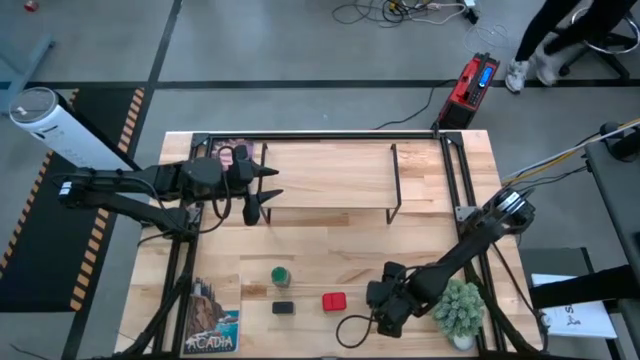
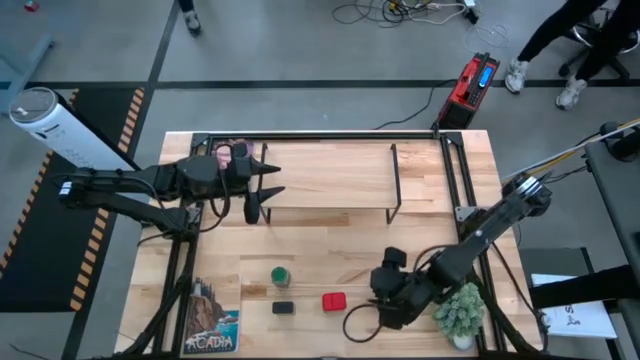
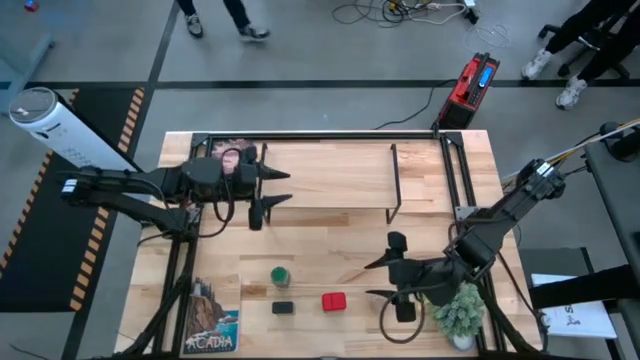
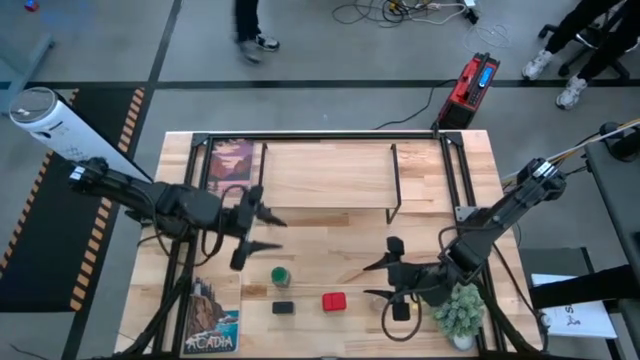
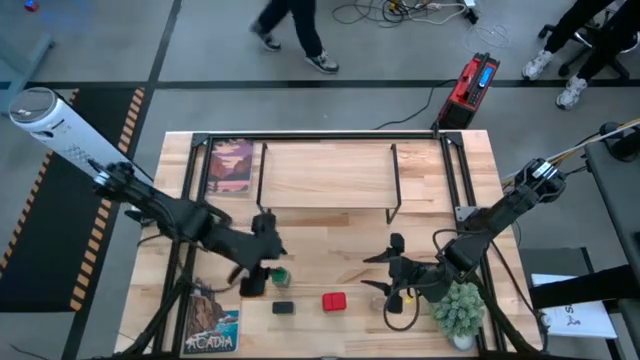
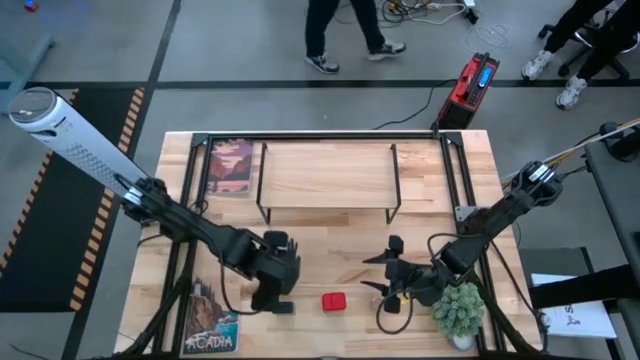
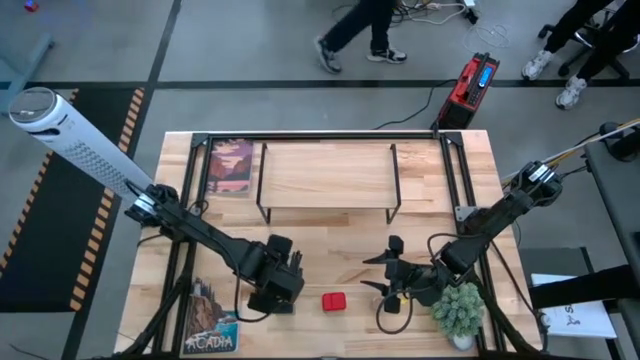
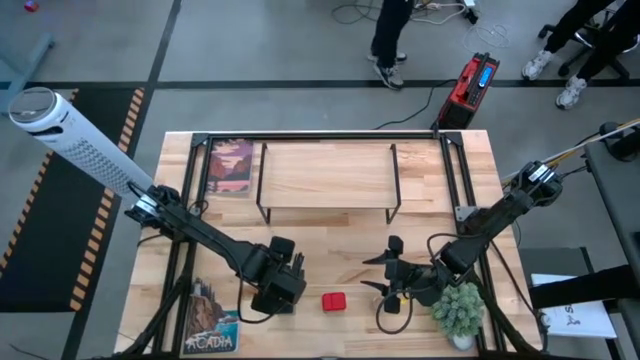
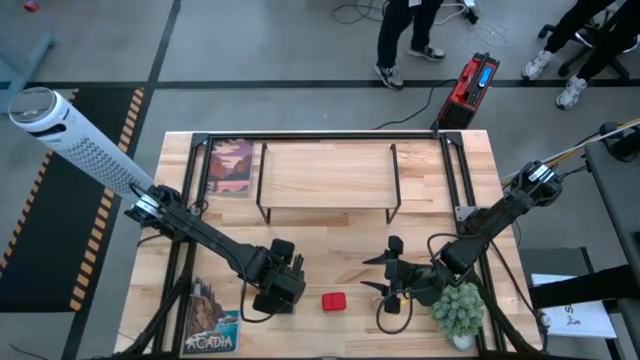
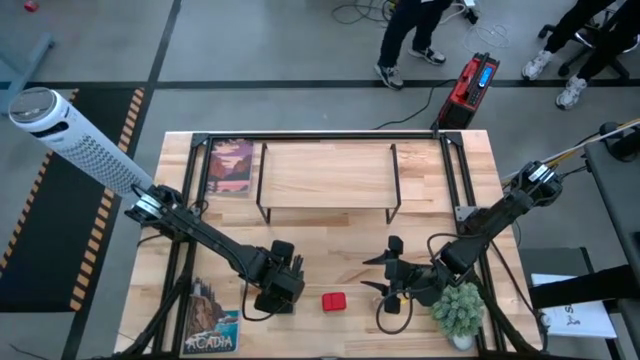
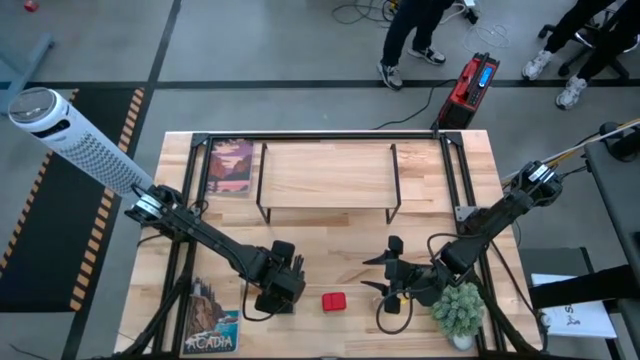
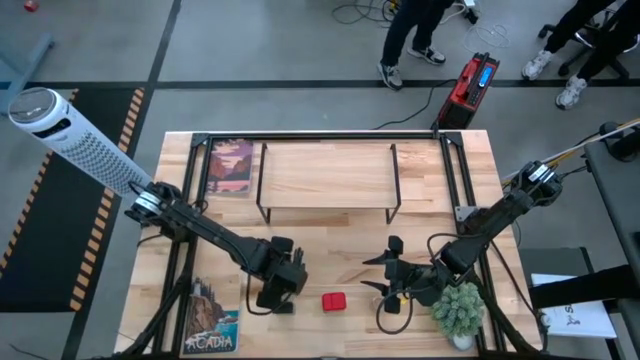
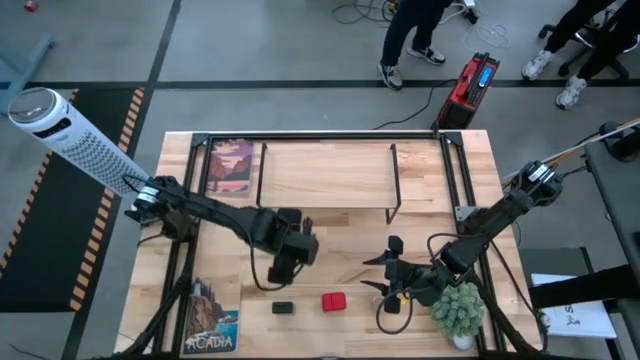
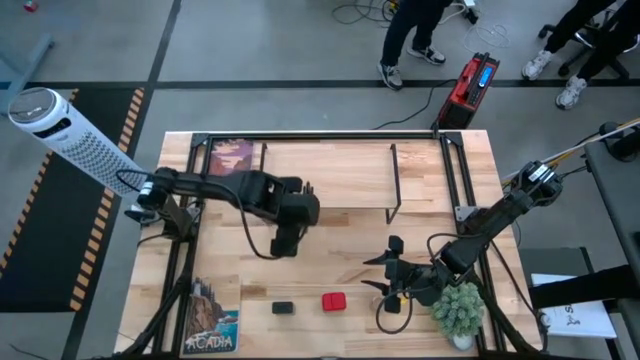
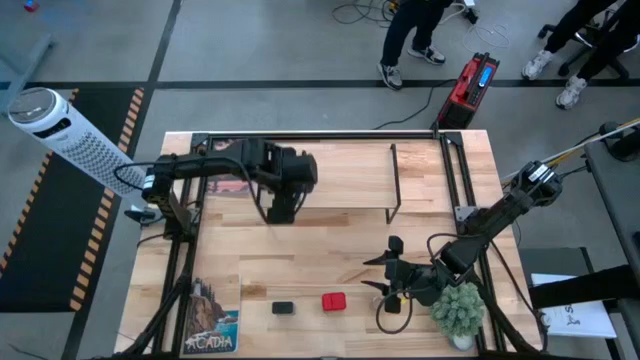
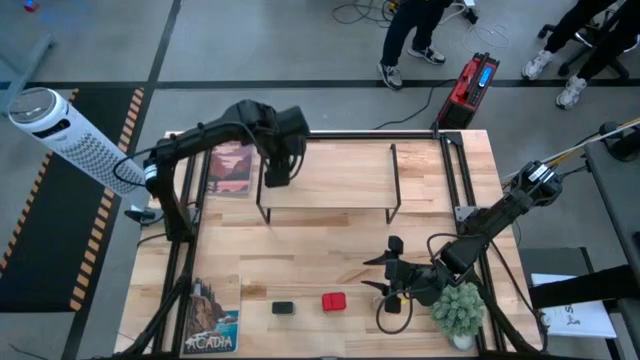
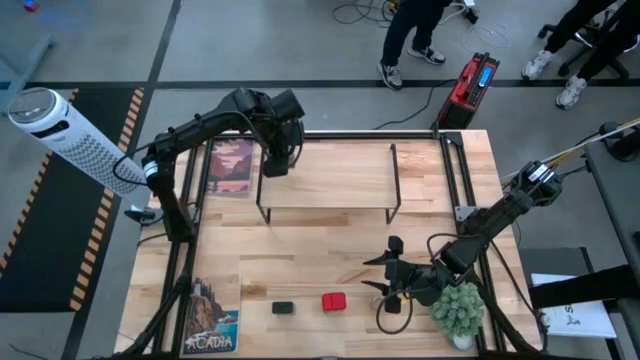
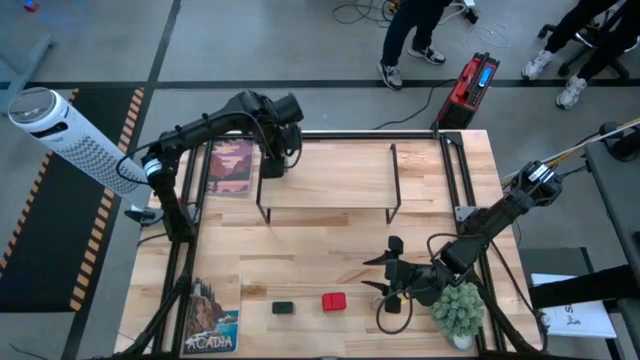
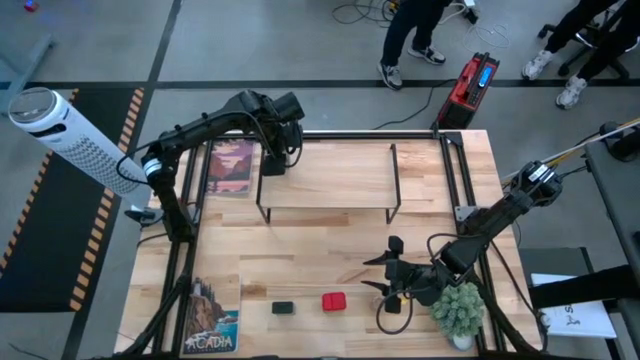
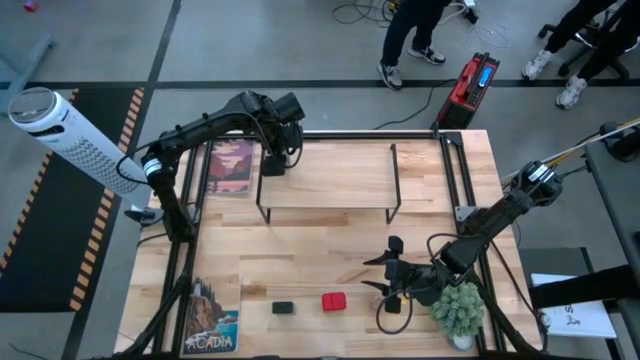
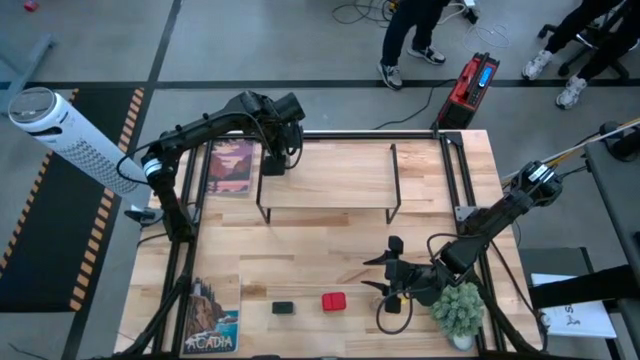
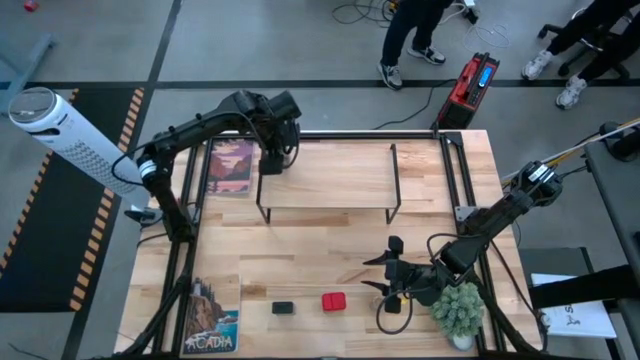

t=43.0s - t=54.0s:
Task: Shelf spices
Put the green seasoning bottle on the shelf

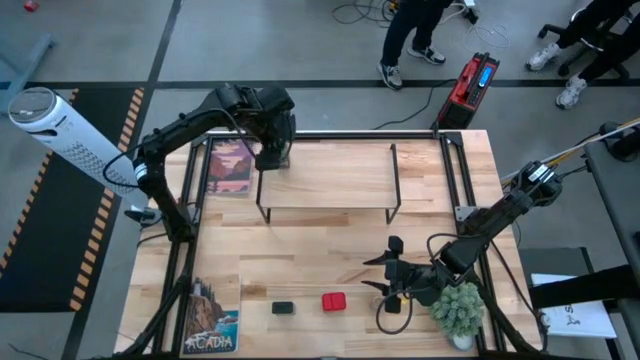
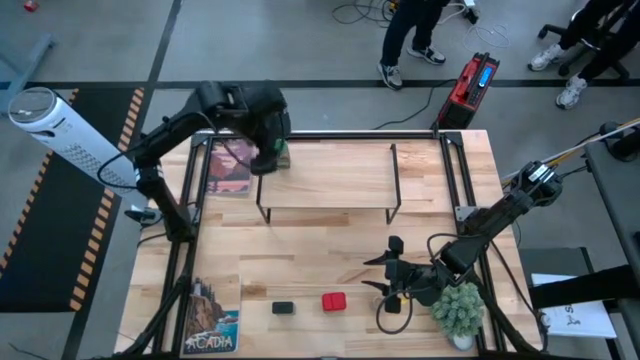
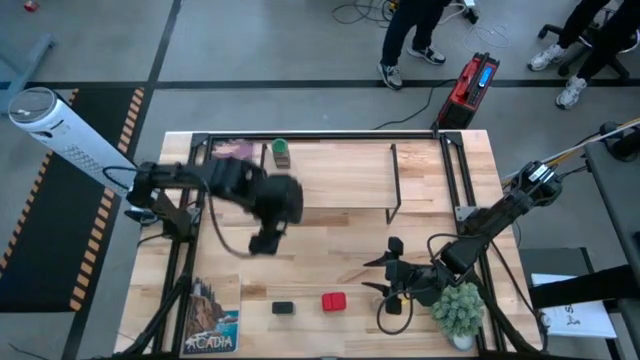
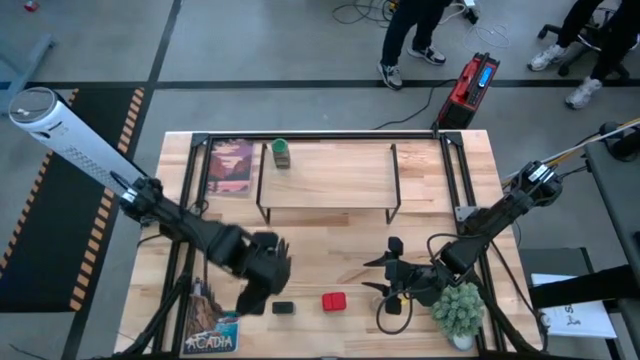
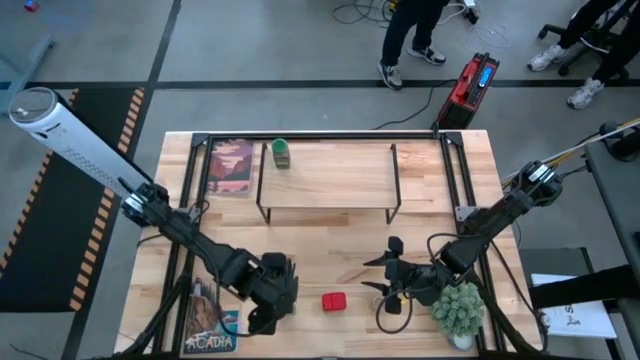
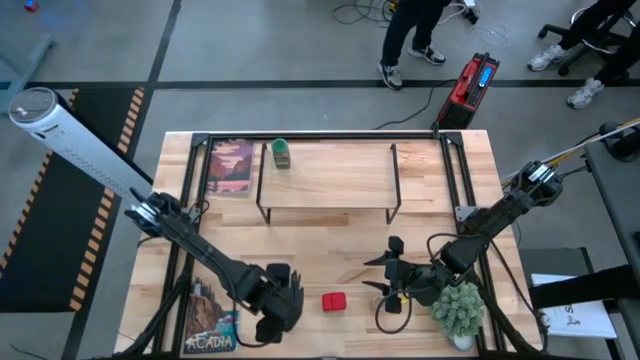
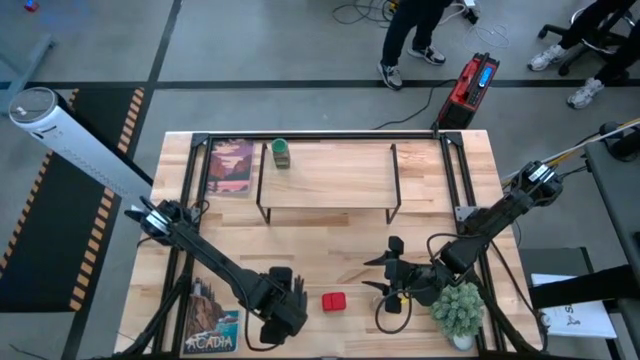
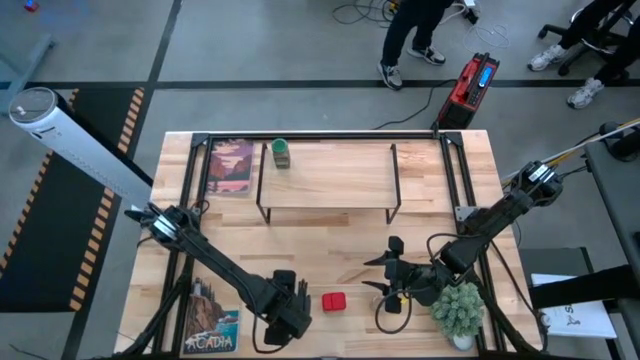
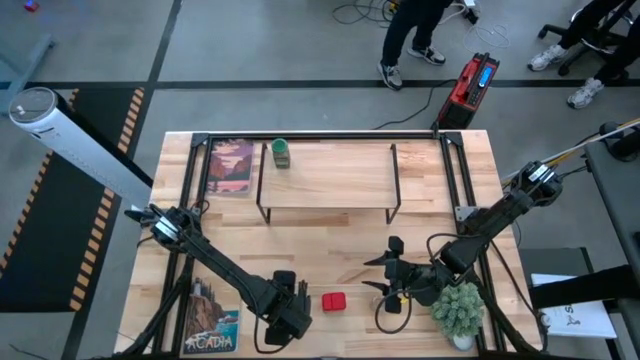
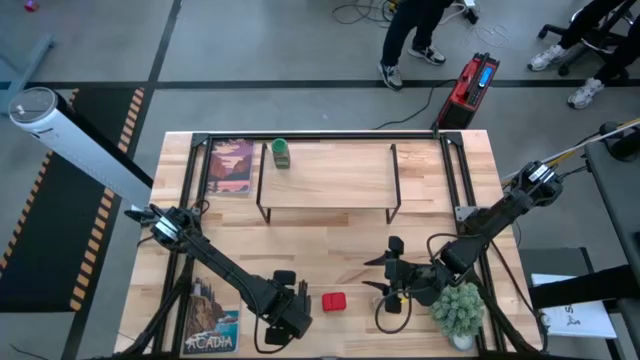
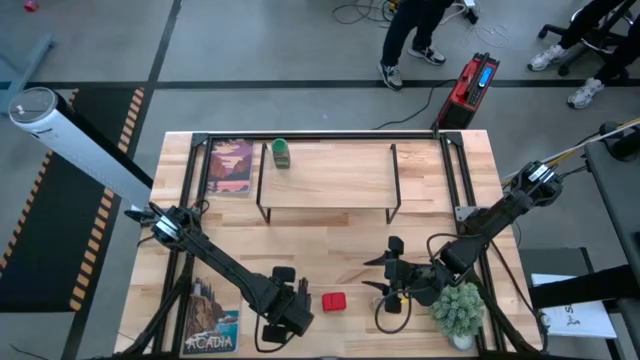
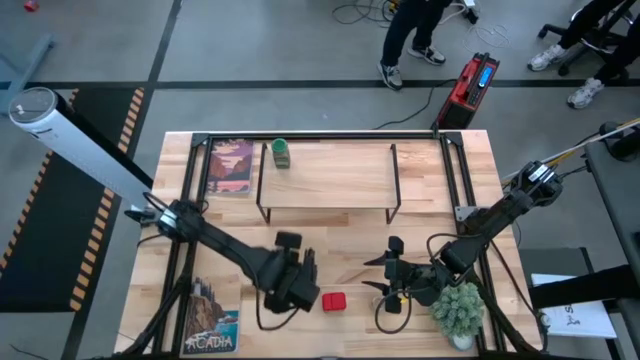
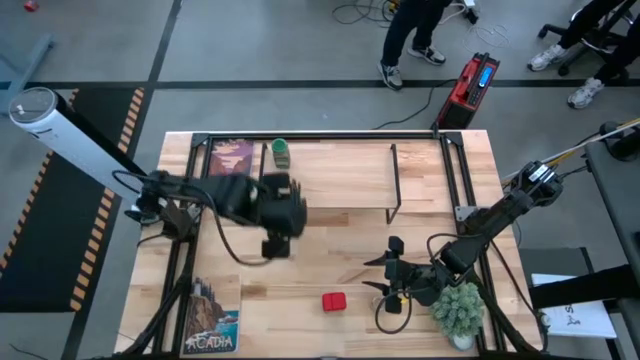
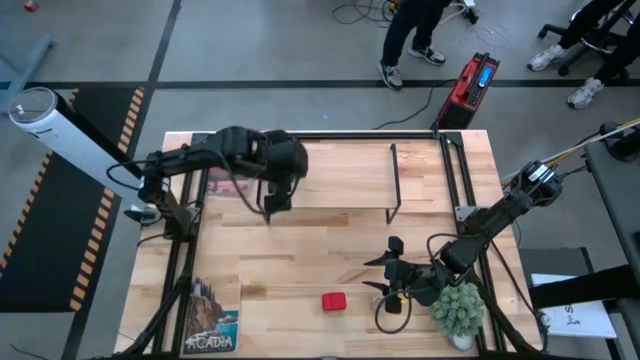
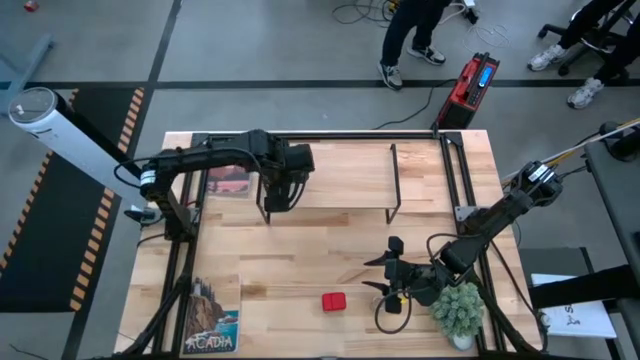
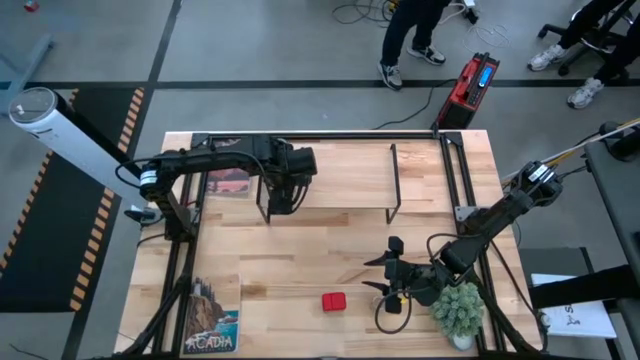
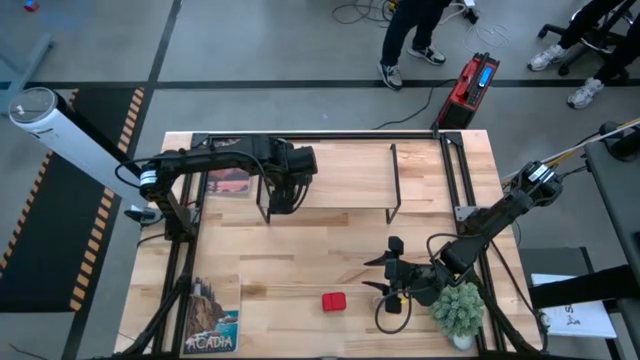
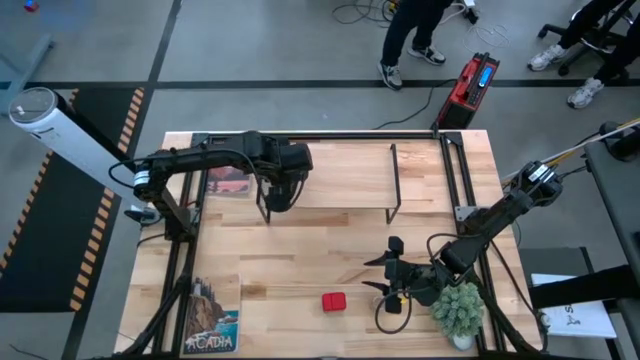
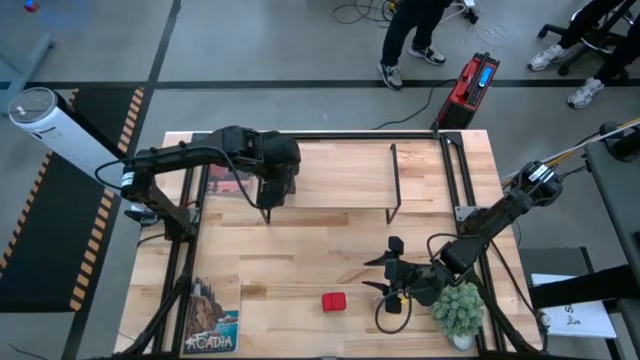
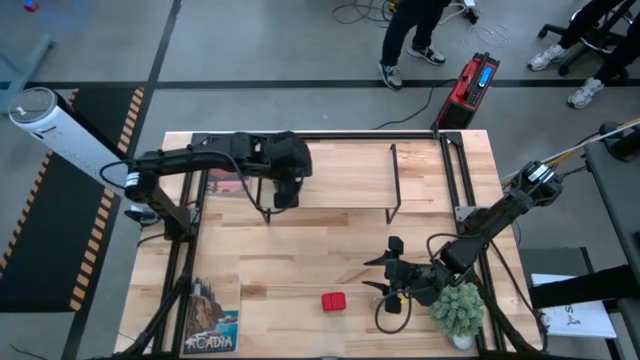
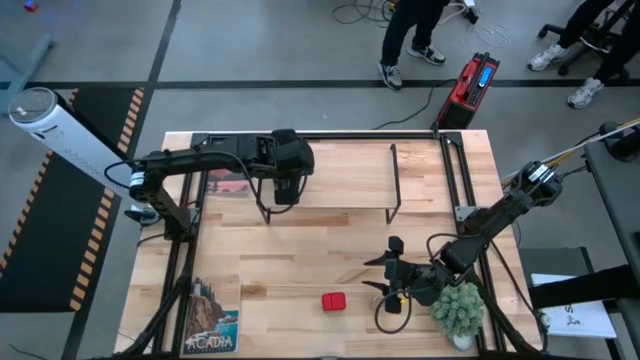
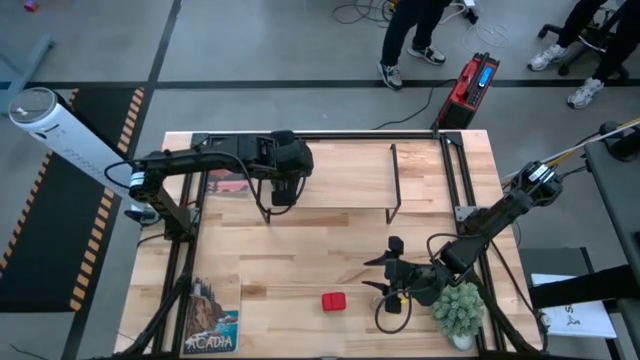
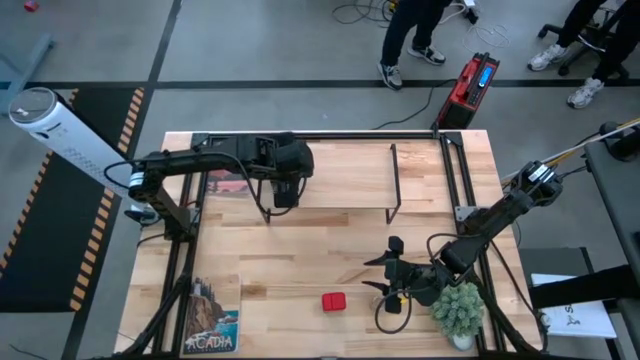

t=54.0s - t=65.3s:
Put the black seasoning can on the shelf
